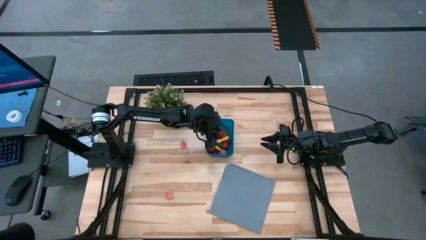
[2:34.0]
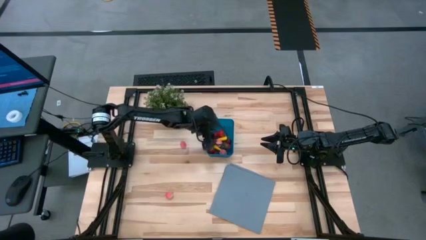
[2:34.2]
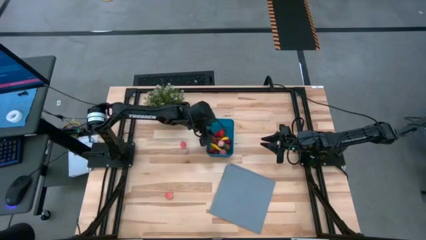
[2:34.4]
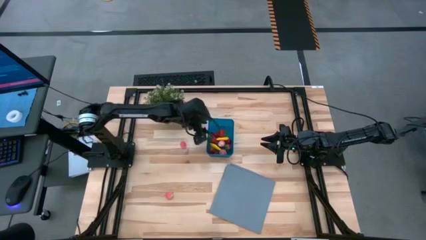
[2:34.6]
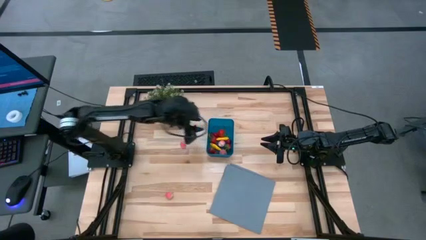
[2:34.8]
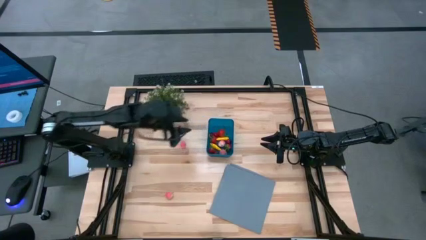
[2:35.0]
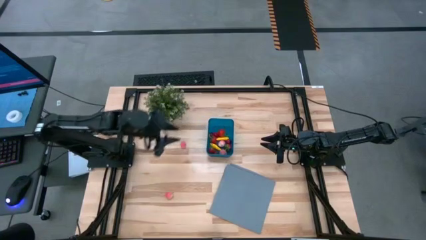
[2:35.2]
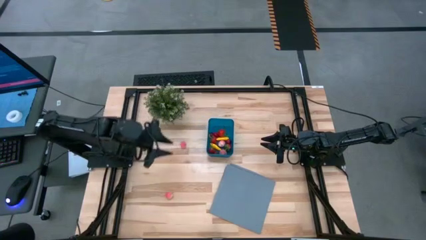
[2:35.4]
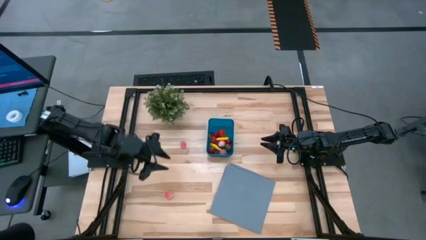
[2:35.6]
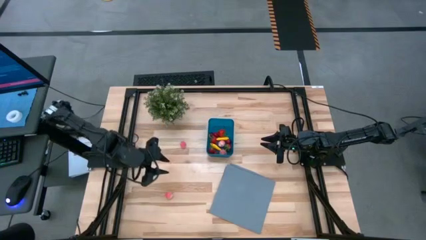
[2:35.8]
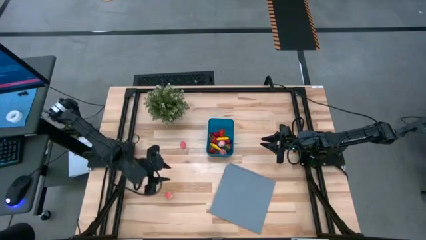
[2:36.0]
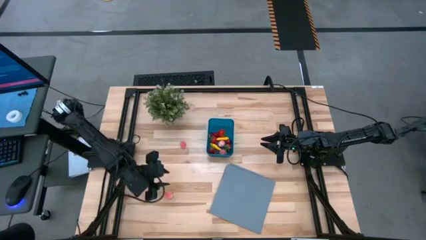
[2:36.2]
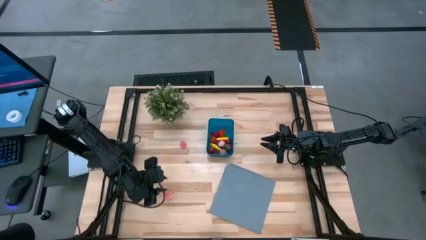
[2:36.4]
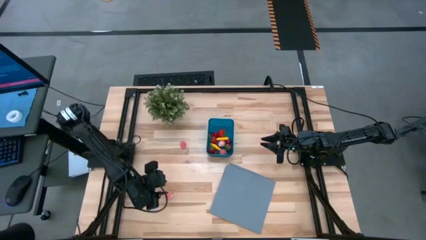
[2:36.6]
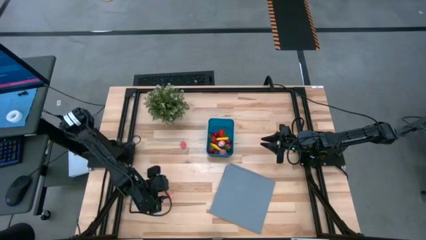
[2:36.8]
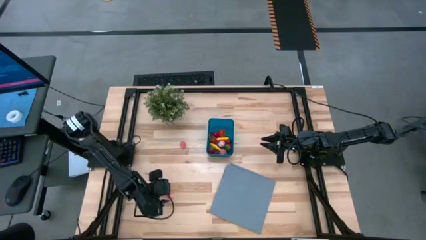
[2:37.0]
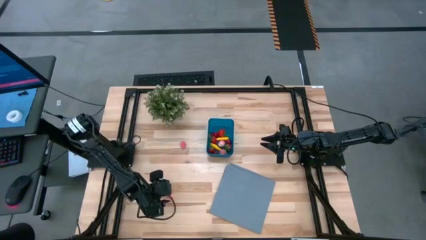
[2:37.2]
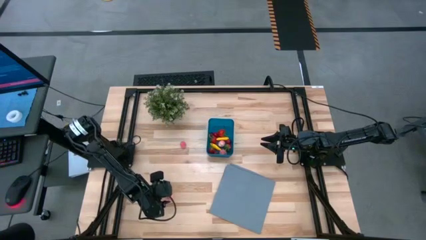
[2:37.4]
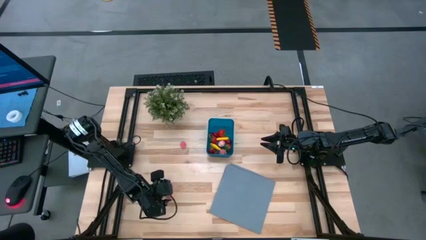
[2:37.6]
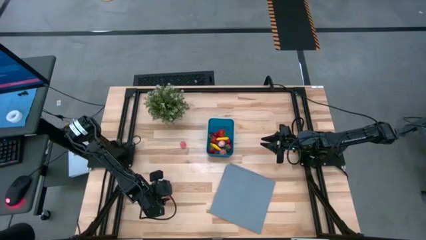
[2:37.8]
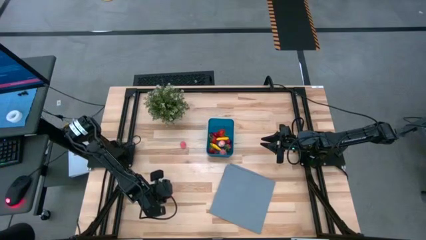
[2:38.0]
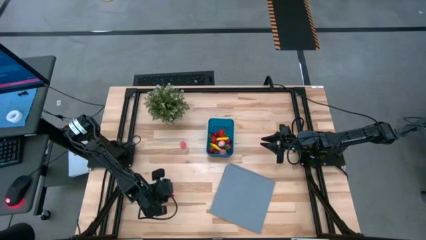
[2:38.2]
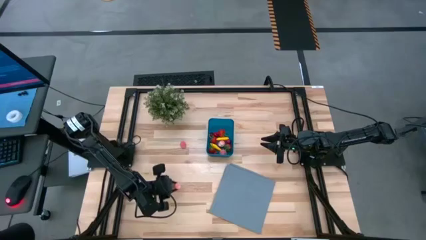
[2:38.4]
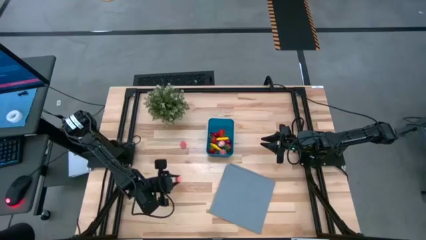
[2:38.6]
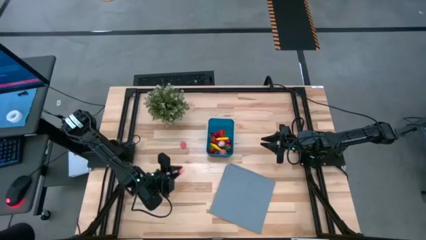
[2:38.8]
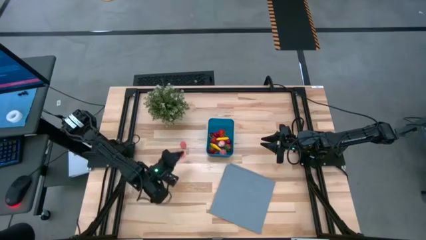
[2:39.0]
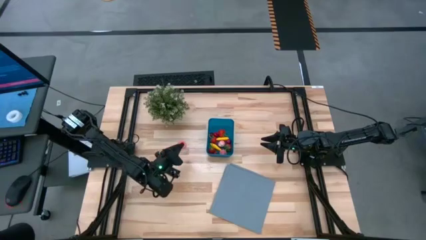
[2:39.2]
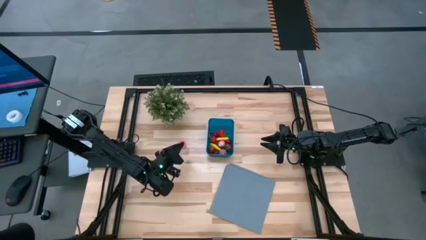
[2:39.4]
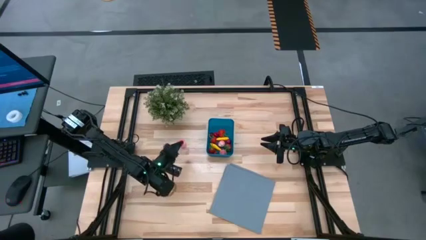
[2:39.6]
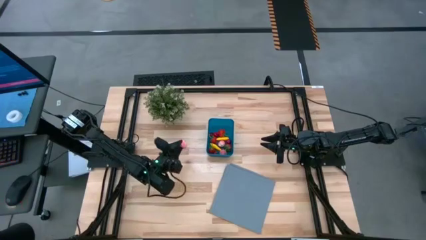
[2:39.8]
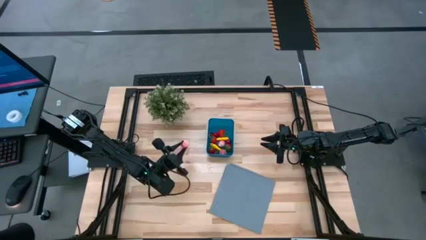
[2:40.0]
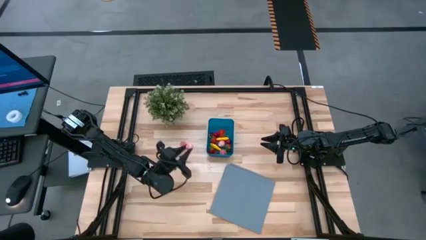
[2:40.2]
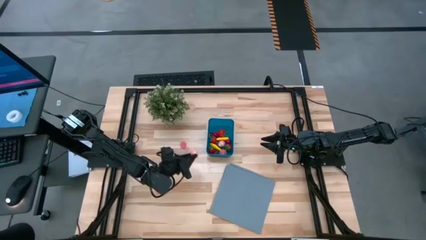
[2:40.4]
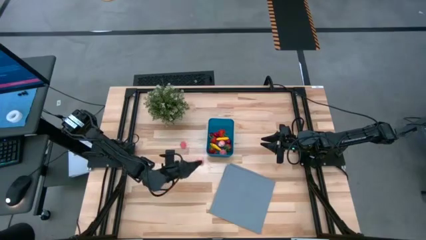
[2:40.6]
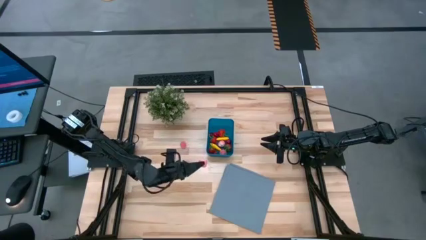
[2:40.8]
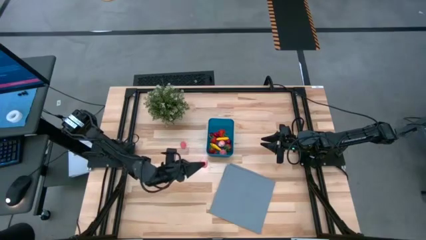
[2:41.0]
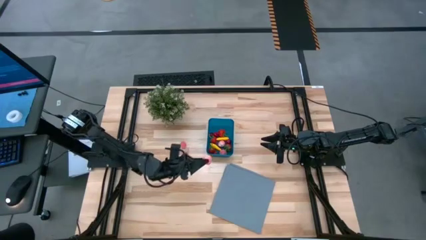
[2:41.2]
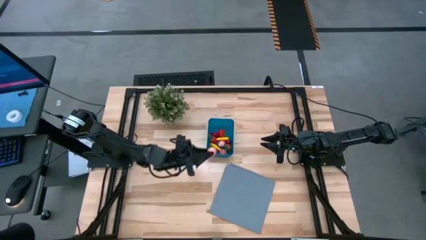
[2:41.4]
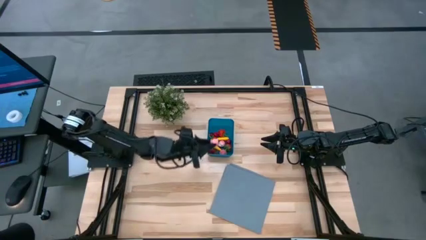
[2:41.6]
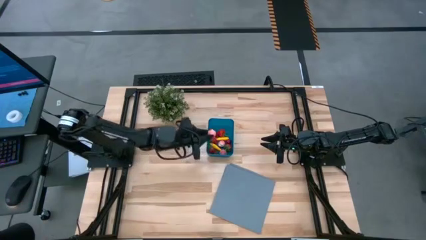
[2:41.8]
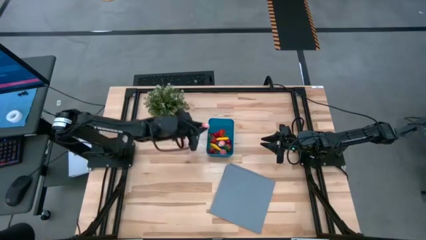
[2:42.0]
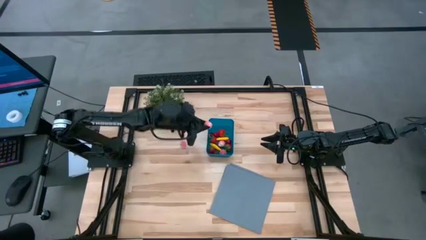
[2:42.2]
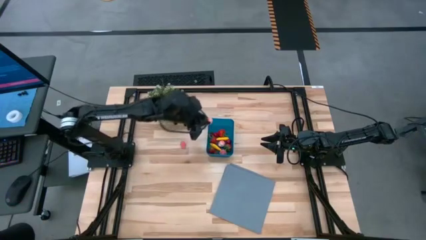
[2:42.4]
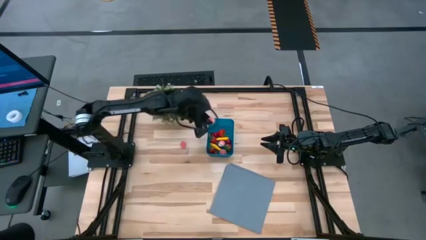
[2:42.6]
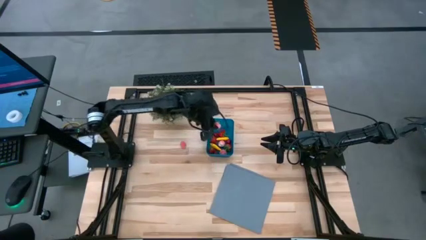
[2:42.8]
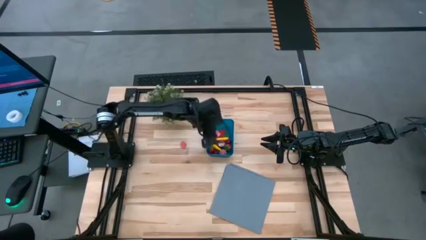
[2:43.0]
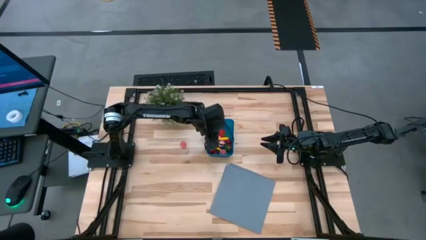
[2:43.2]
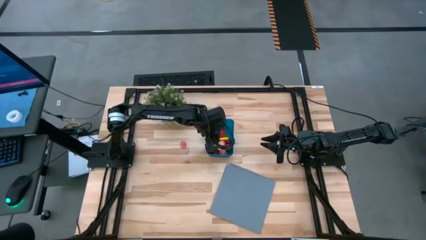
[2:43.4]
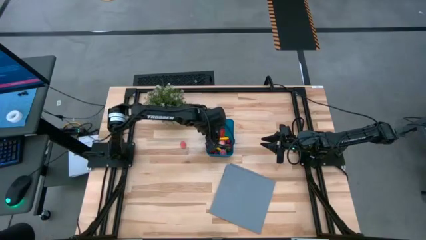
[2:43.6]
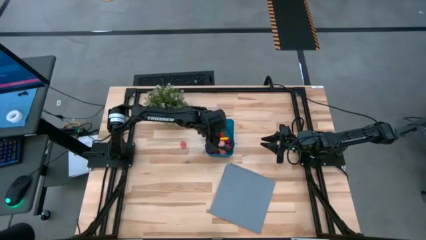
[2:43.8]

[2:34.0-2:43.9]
Task: Pick and placing Produce into tupperware
Put the peach into the blue bin

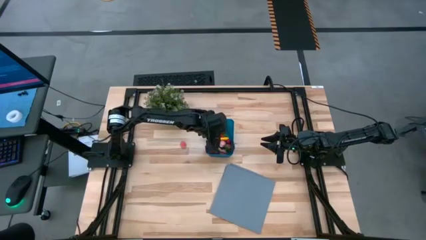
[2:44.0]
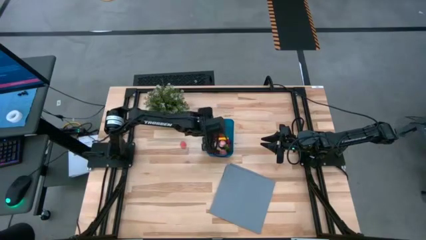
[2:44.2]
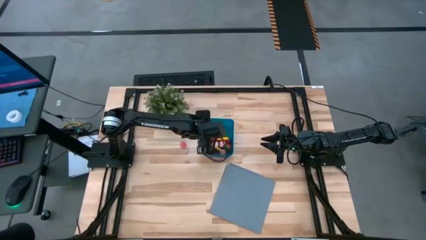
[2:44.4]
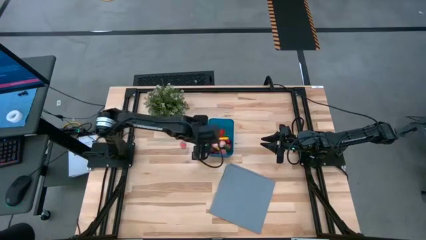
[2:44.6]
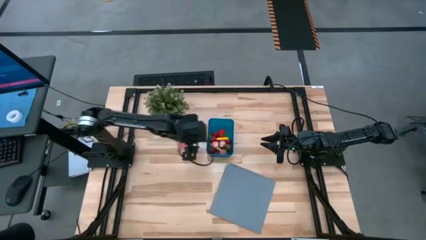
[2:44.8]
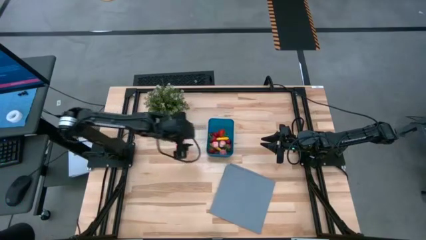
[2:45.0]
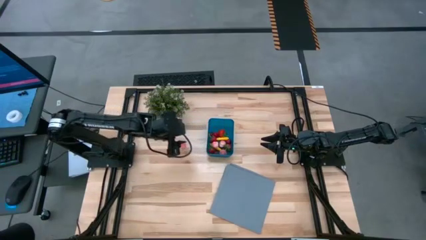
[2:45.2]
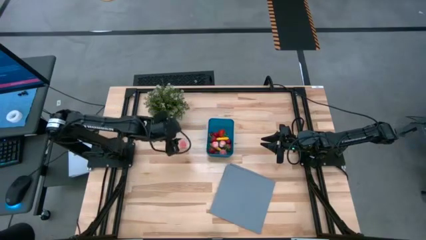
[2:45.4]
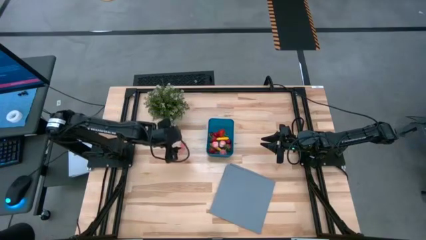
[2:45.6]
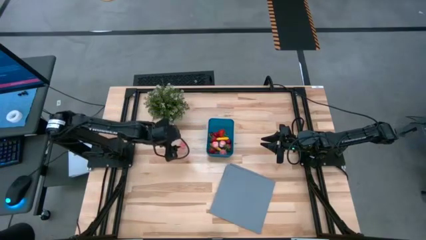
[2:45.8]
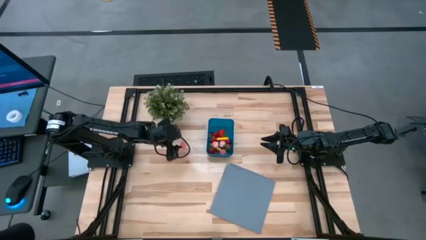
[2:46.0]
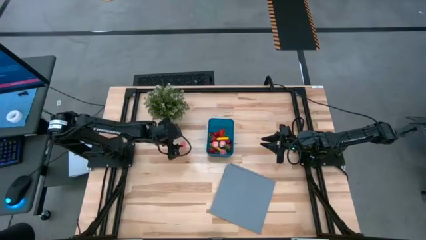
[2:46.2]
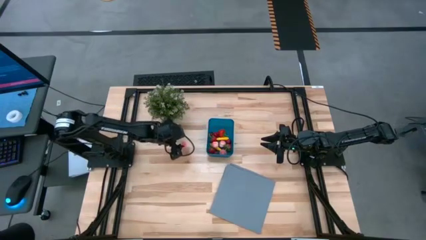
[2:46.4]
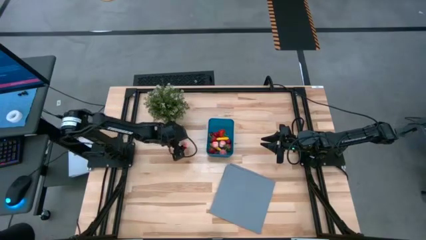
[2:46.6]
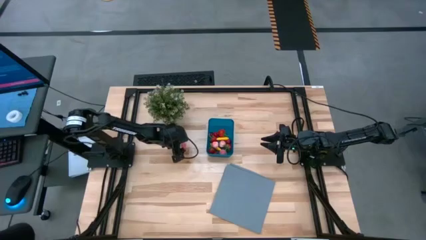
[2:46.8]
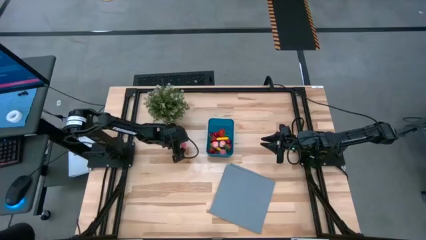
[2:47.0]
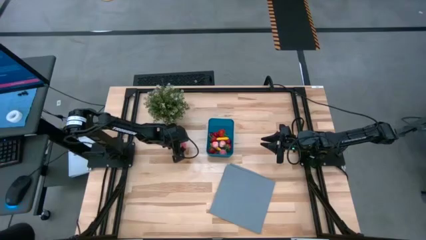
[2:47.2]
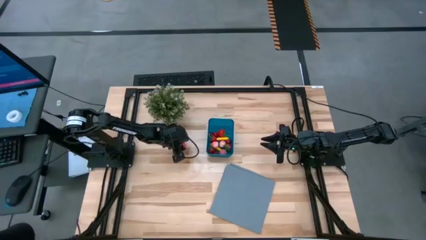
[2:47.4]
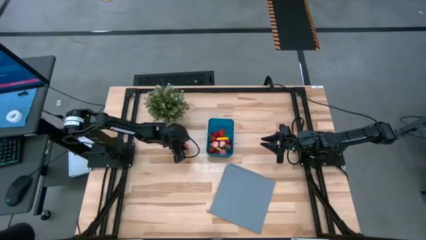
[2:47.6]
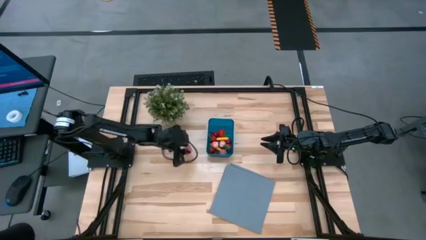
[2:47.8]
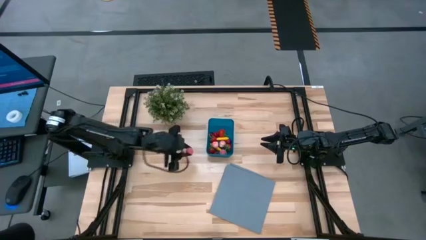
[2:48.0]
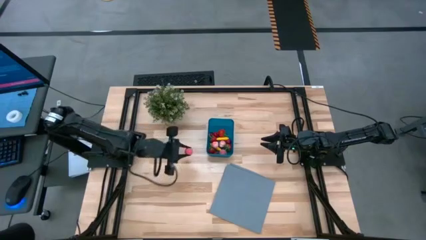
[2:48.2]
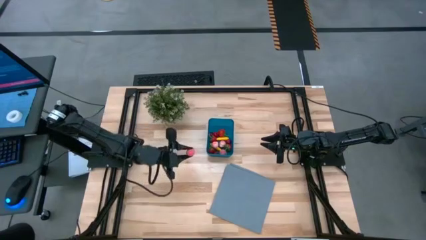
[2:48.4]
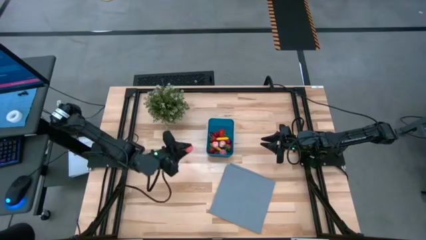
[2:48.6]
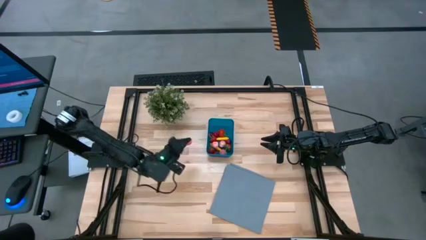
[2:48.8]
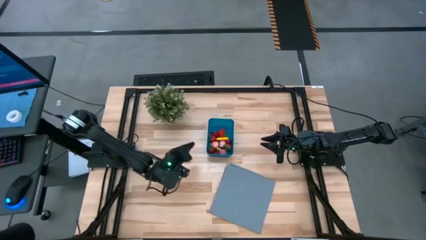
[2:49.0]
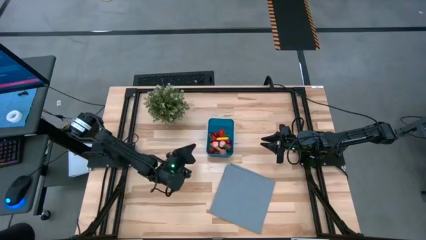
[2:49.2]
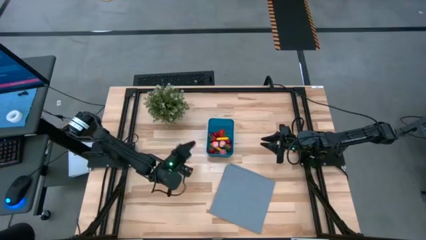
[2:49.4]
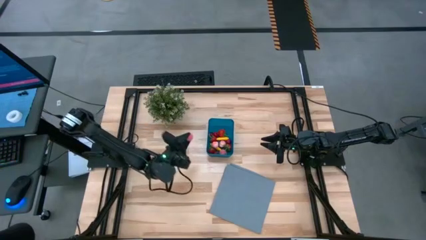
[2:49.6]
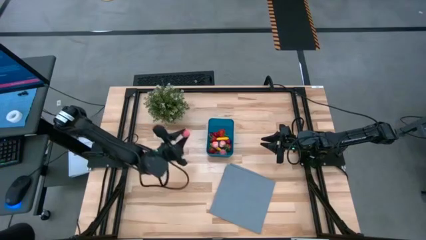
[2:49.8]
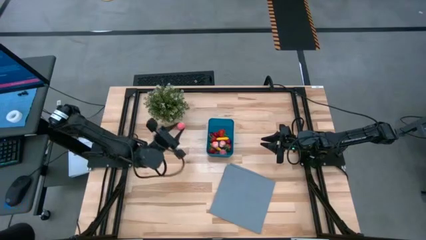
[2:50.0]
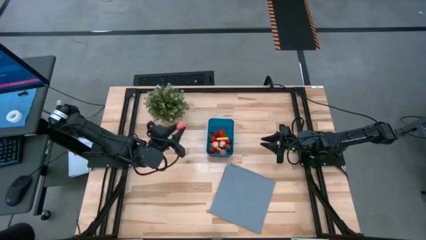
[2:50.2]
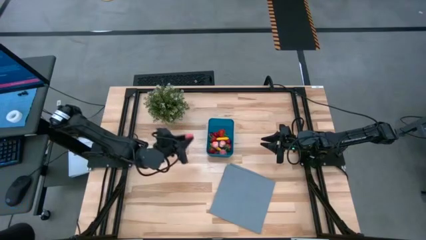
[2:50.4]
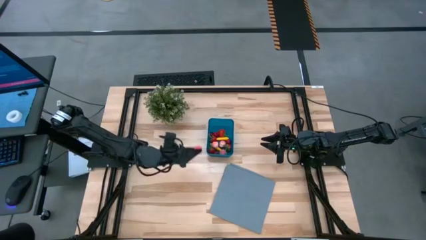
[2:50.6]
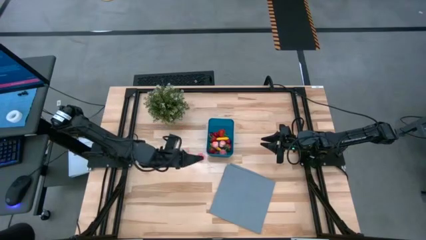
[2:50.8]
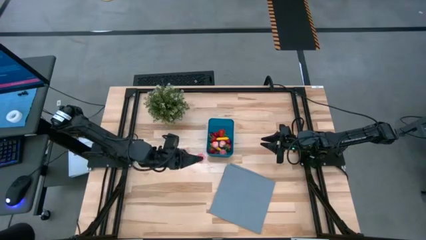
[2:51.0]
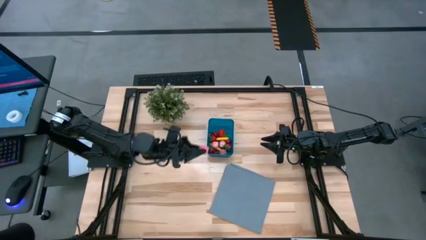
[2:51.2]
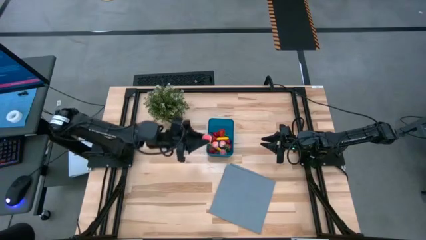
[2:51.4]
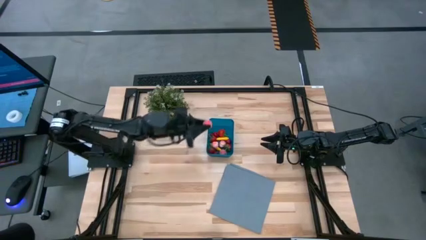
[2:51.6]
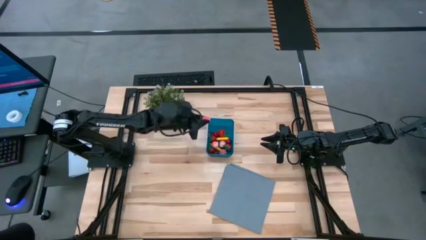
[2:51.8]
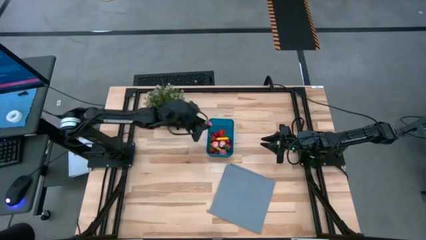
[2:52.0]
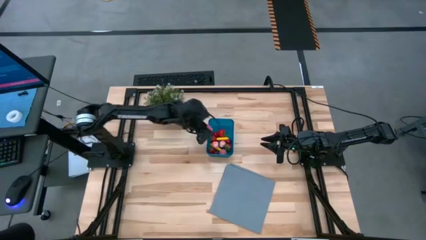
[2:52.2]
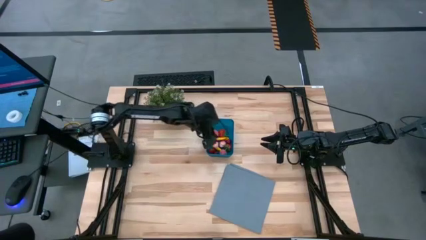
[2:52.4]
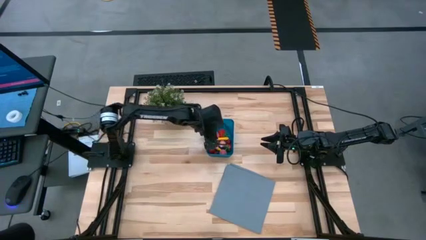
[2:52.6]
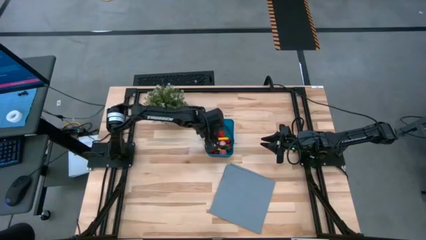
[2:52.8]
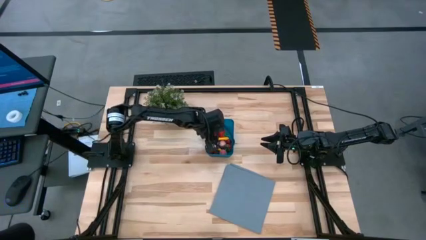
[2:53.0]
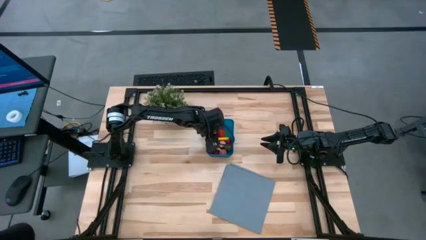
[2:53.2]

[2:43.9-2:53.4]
Put the peach into the blue bin
